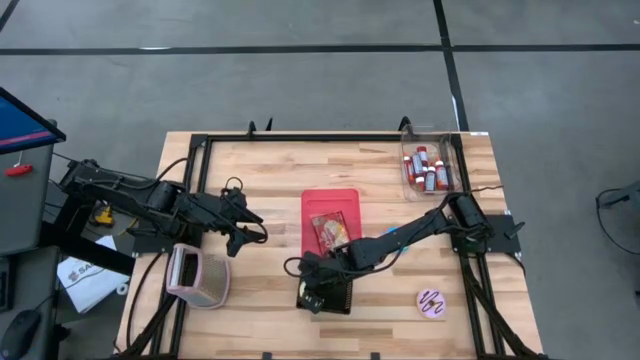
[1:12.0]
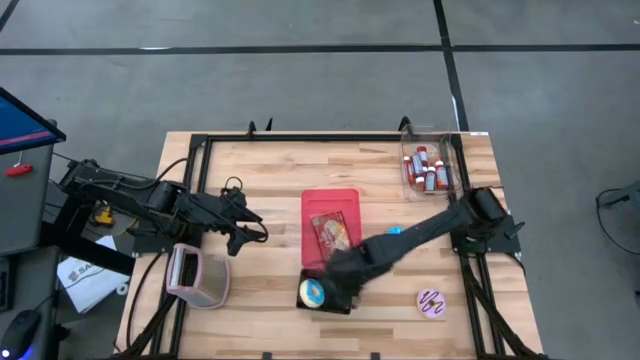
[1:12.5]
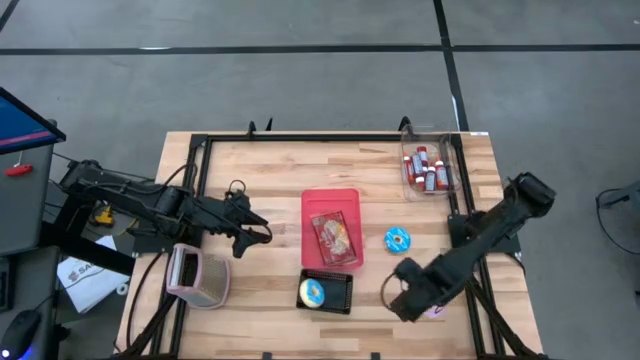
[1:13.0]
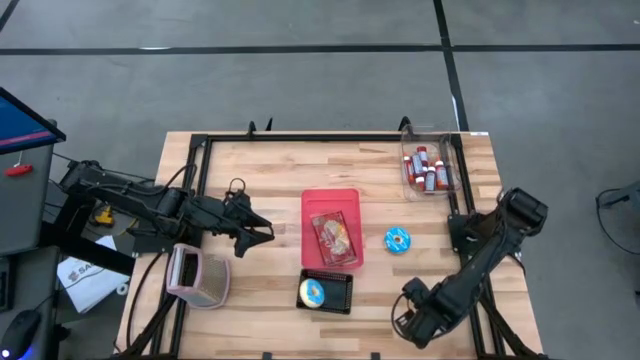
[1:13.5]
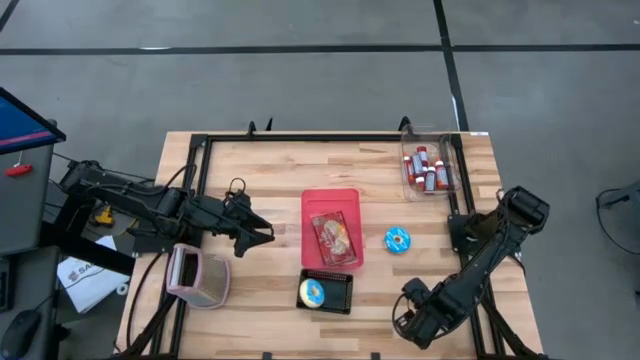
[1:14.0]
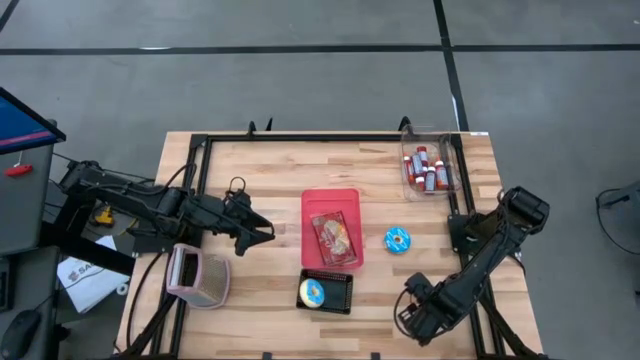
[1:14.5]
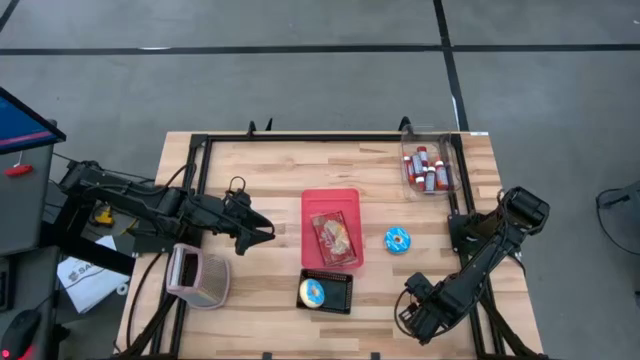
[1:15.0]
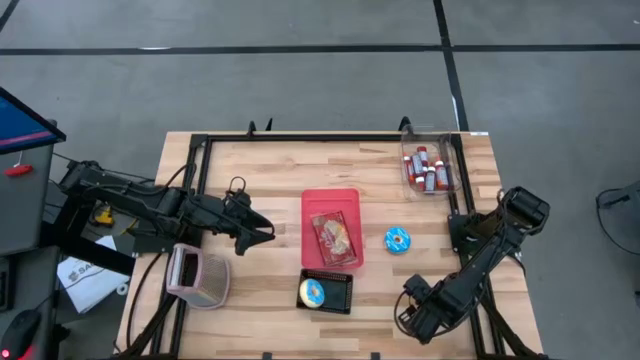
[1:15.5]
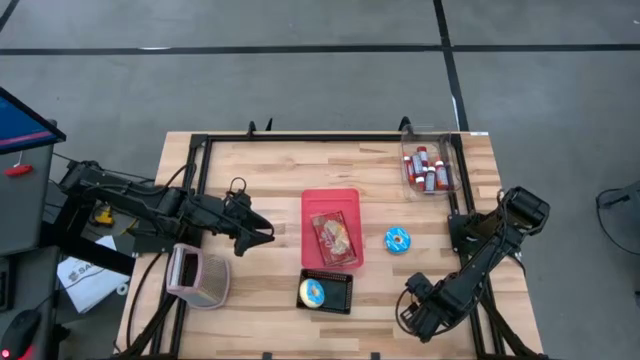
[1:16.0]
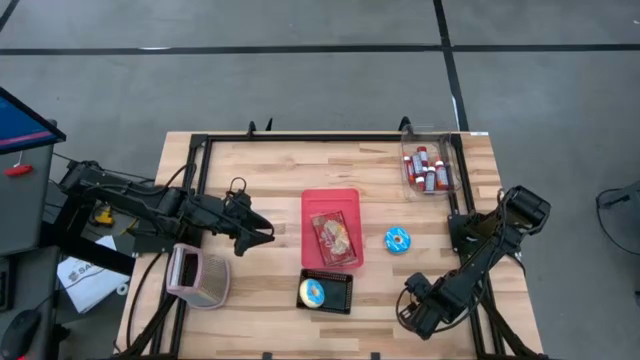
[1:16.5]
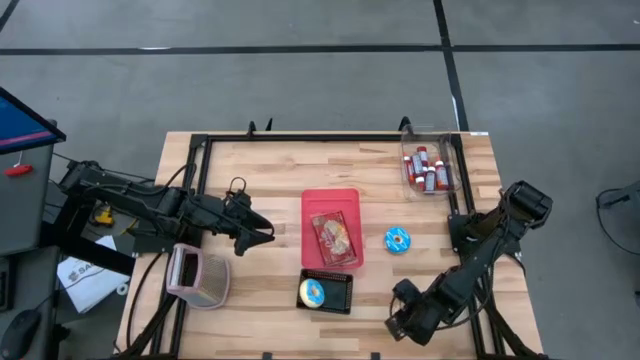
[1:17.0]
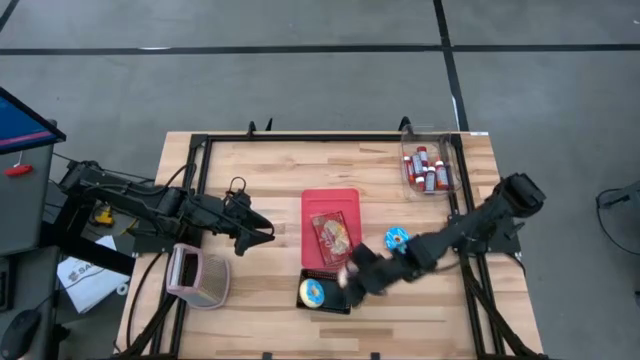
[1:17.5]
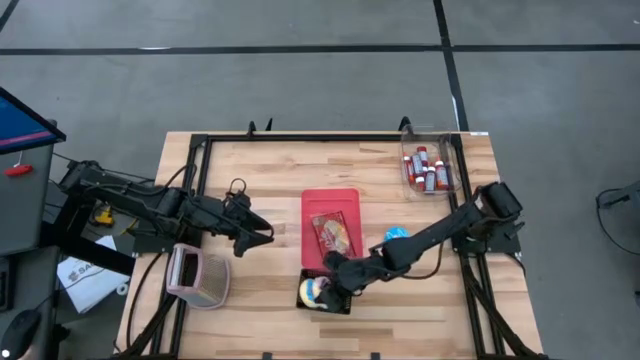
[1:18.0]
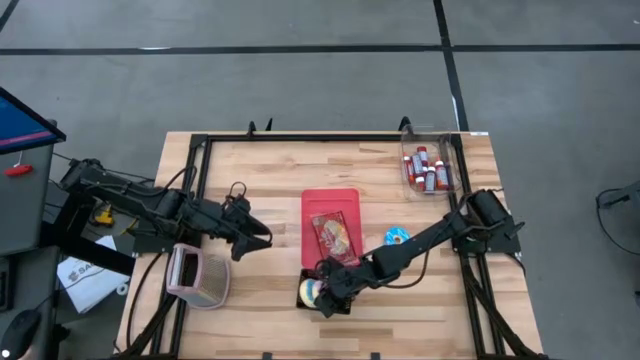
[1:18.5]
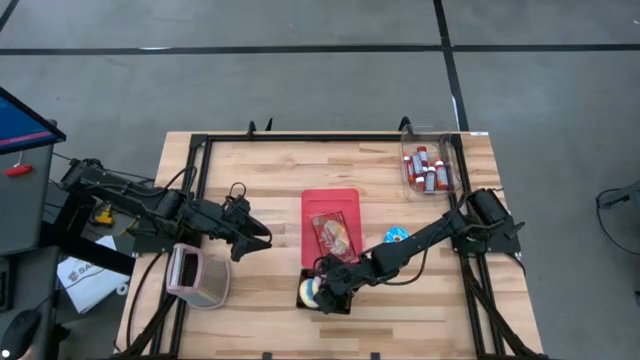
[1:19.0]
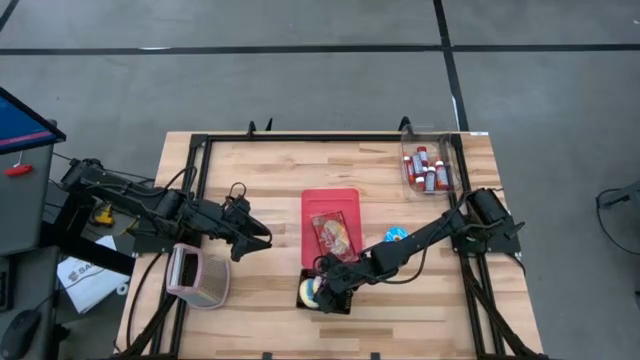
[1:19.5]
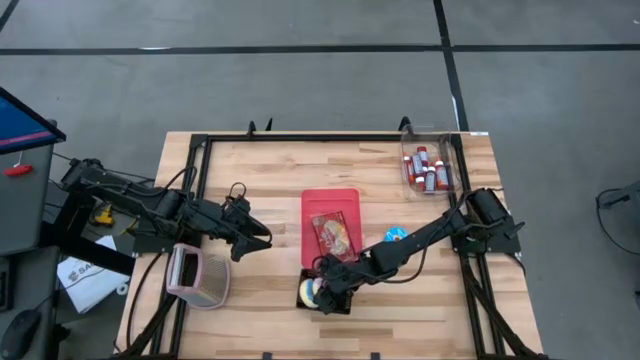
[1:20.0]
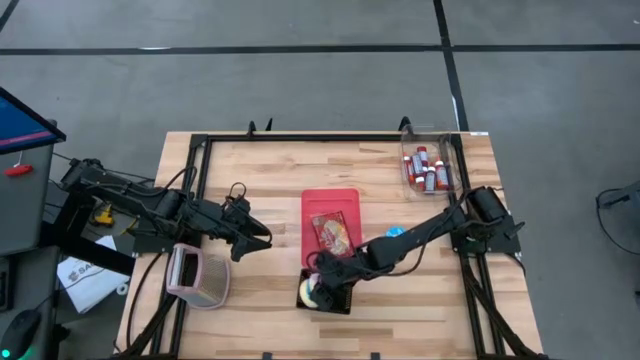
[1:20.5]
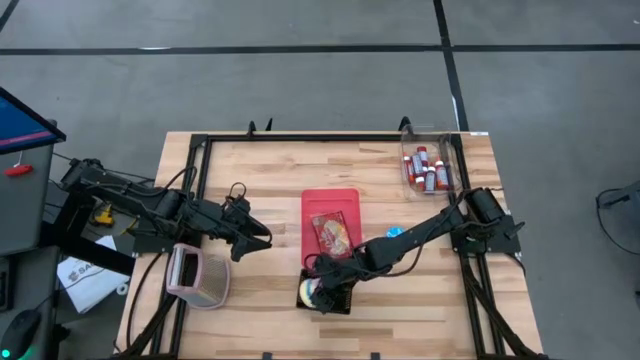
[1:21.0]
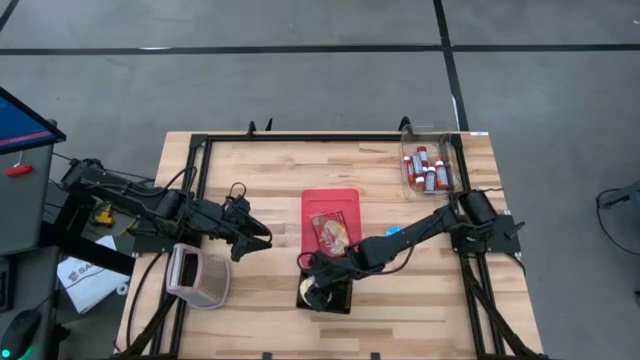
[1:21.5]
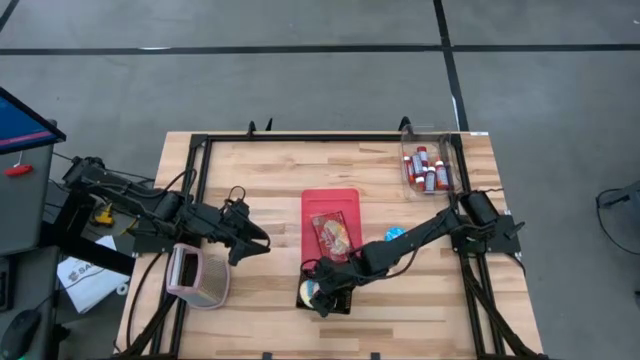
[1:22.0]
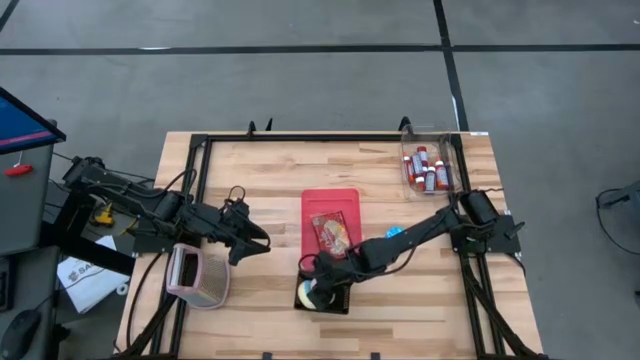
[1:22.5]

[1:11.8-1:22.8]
Put the violet donut into the black bin

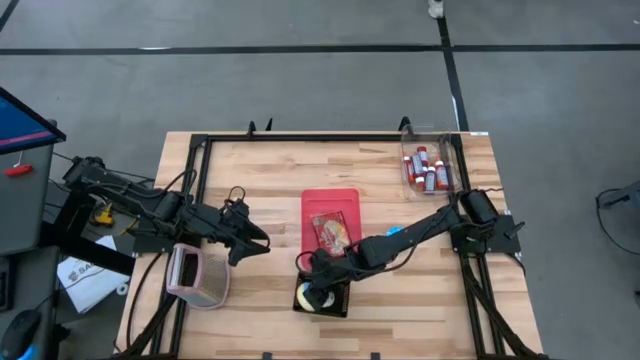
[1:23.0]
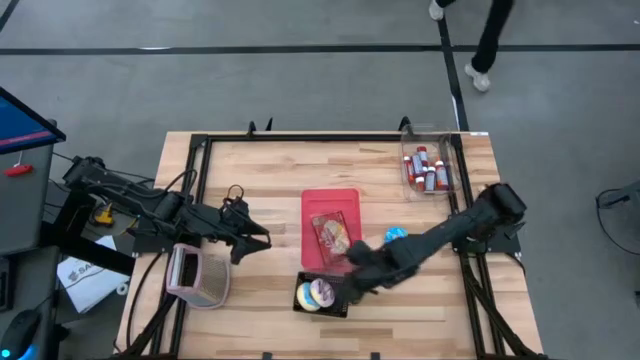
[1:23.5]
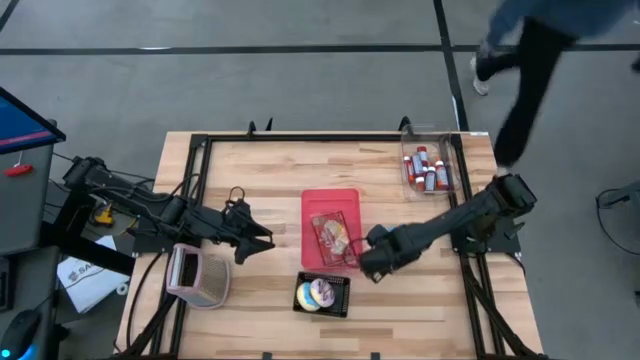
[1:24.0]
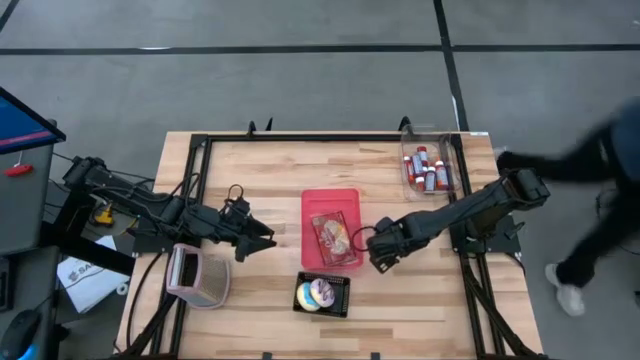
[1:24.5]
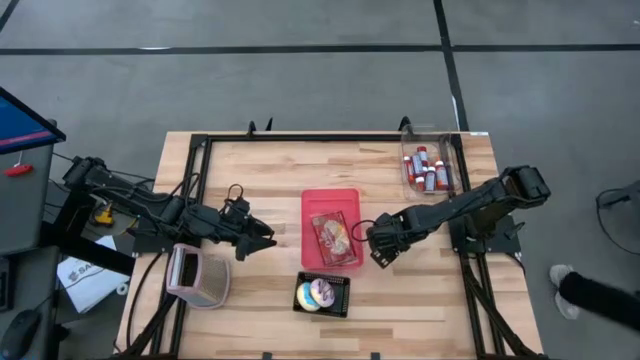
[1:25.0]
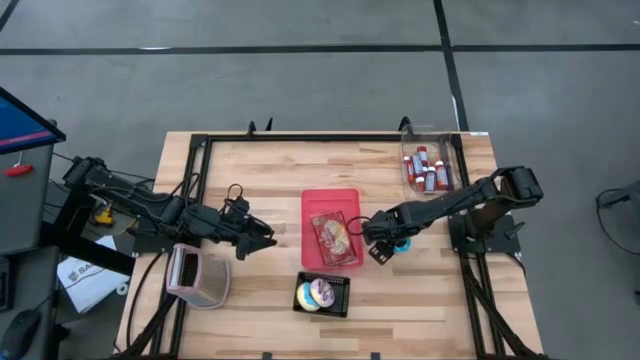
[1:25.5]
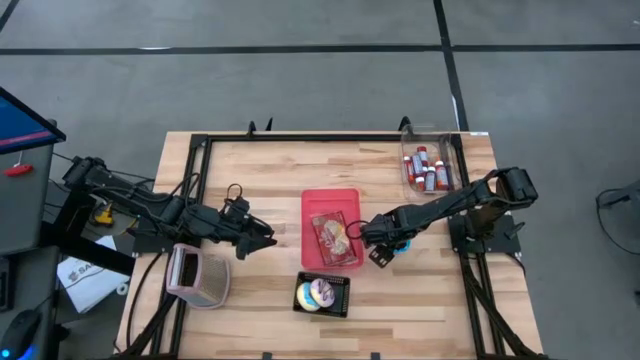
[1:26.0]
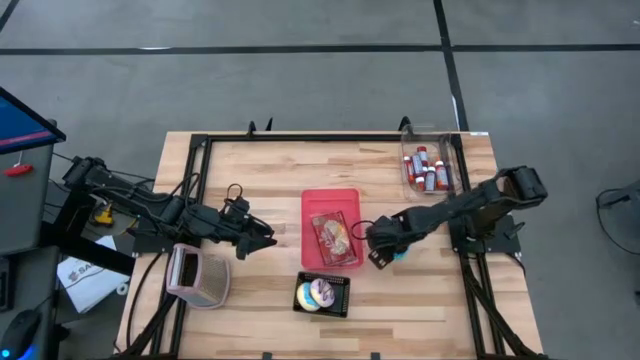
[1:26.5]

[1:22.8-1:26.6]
Put the blue donut into the black bin

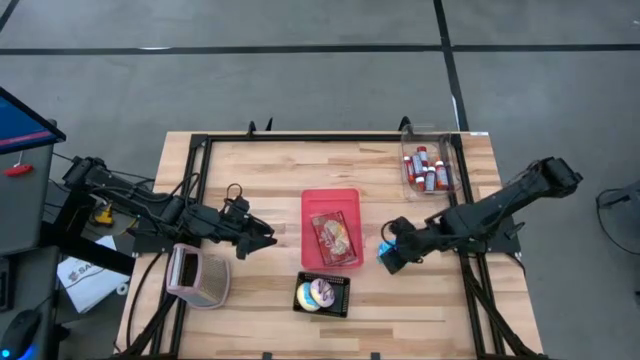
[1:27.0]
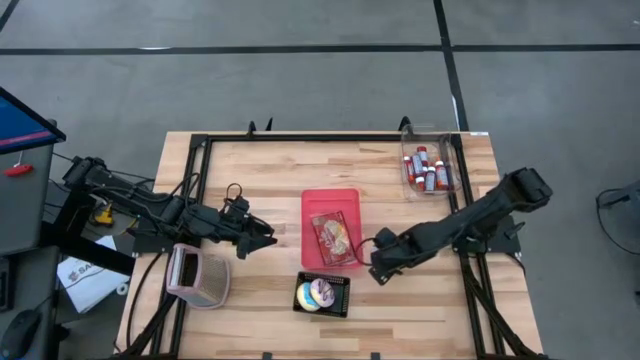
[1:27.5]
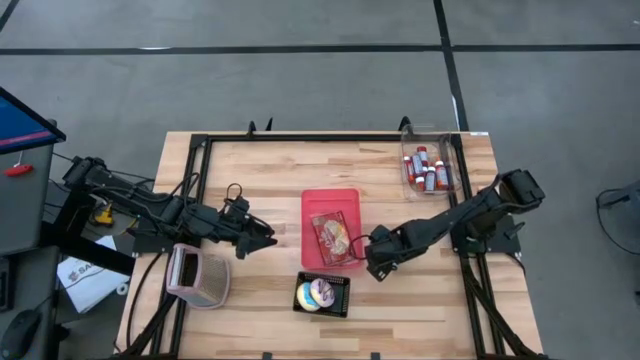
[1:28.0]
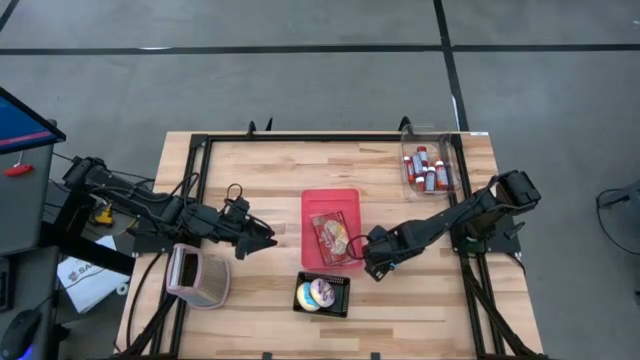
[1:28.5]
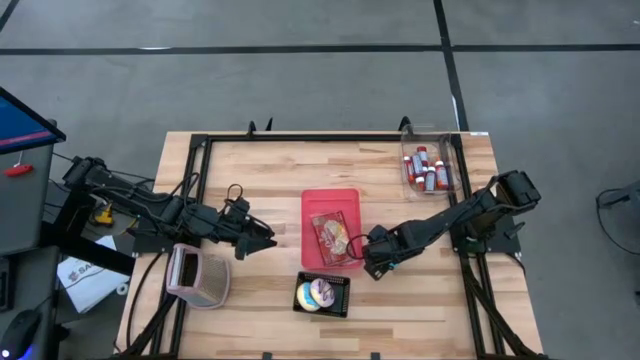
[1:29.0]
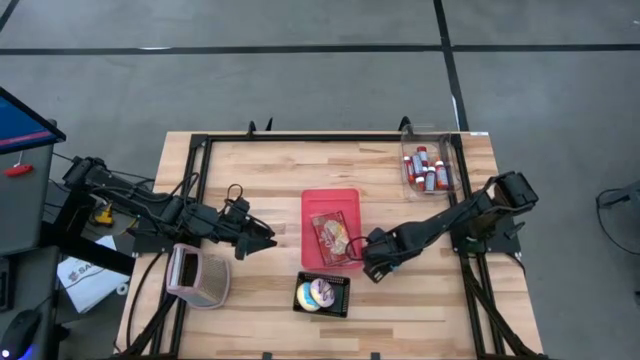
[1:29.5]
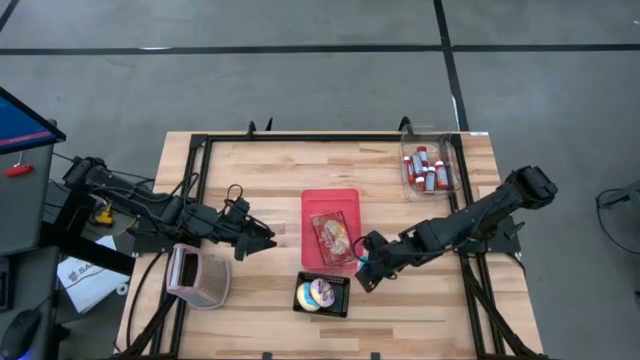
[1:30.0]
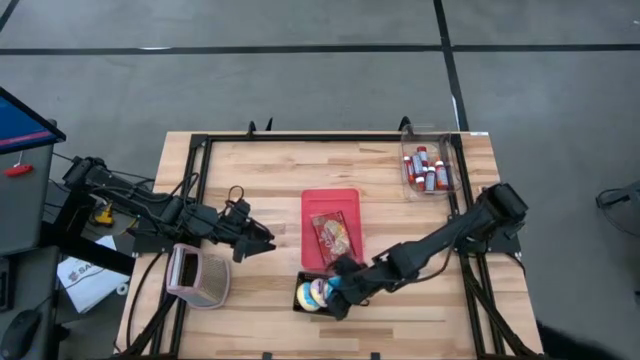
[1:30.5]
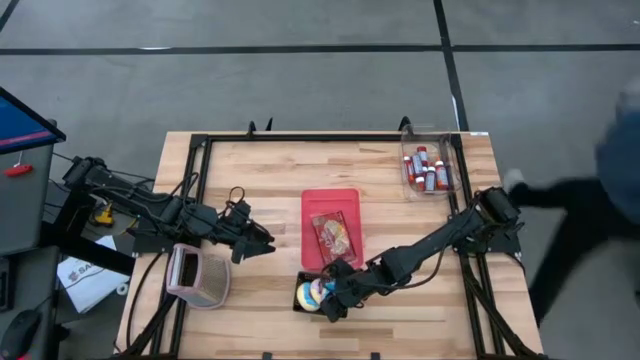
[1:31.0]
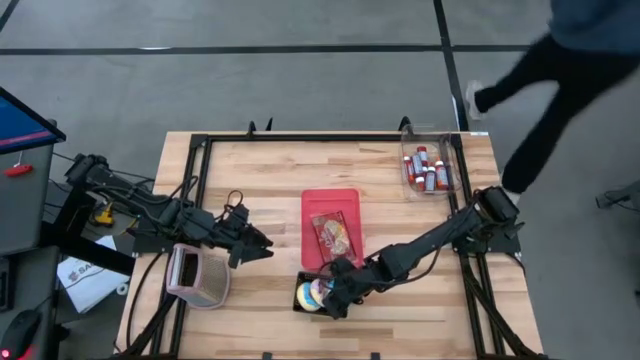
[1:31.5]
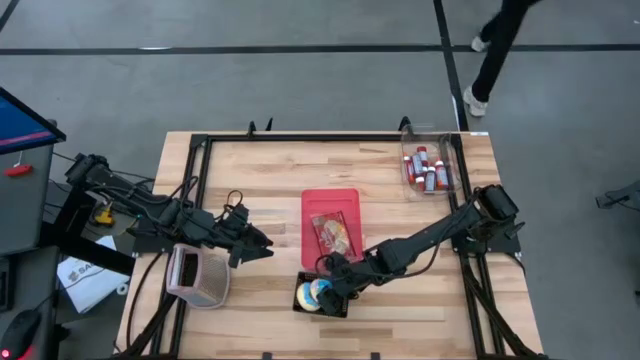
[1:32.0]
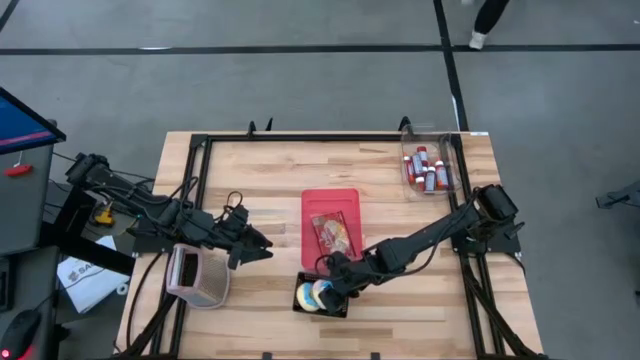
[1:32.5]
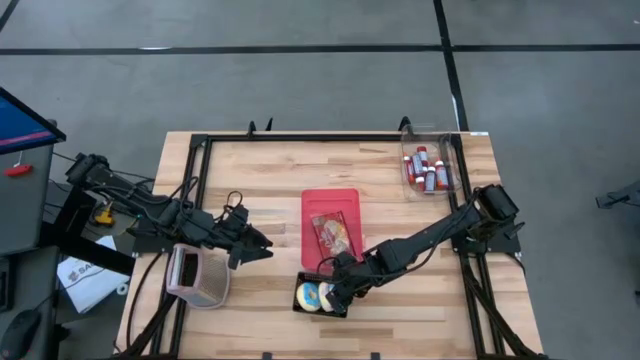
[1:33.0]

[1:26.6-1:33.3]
Put the blue donut into the black bin
